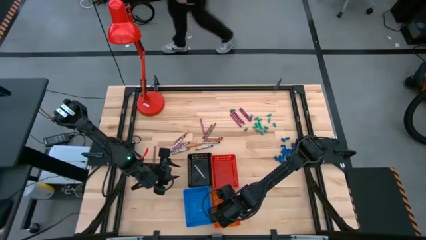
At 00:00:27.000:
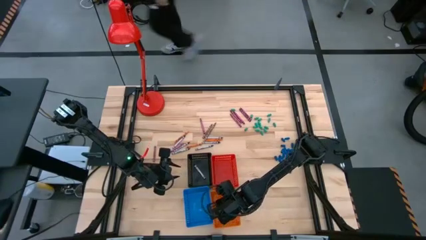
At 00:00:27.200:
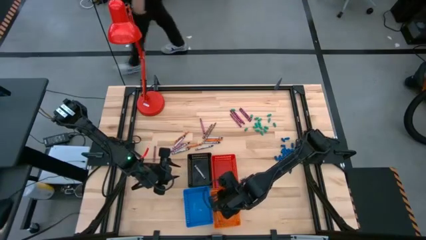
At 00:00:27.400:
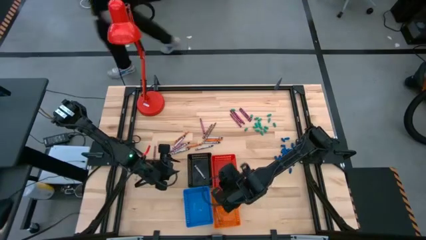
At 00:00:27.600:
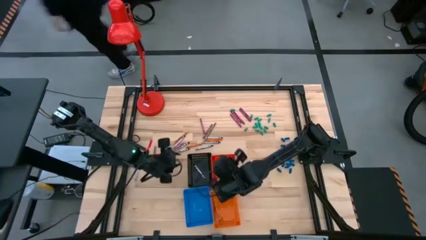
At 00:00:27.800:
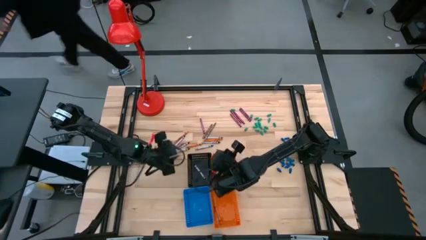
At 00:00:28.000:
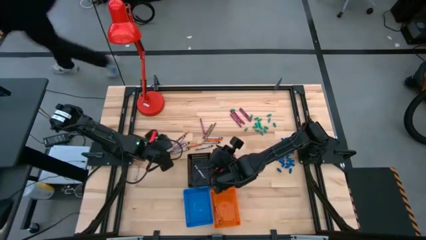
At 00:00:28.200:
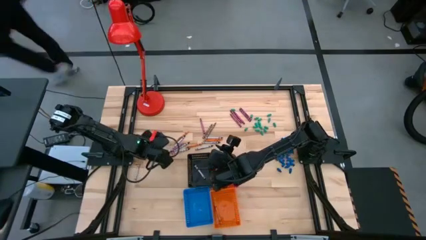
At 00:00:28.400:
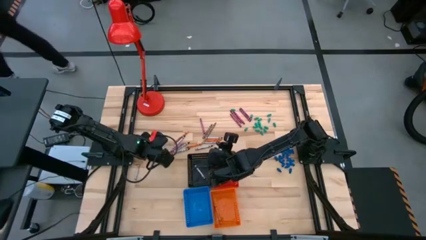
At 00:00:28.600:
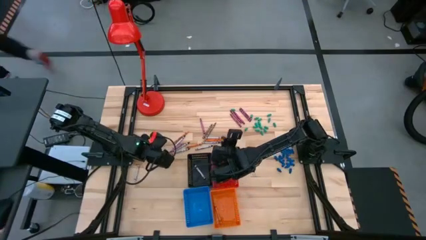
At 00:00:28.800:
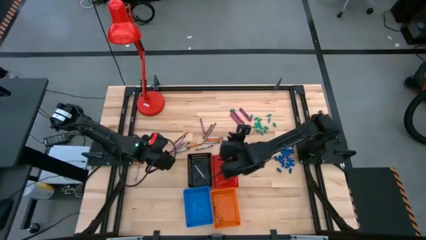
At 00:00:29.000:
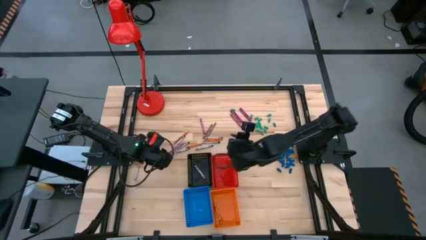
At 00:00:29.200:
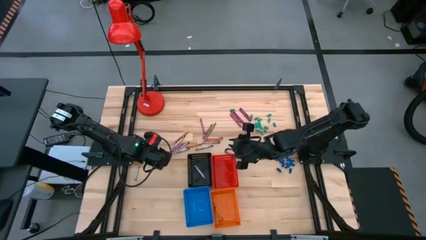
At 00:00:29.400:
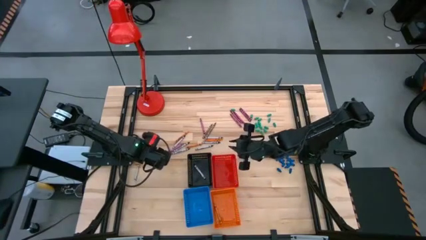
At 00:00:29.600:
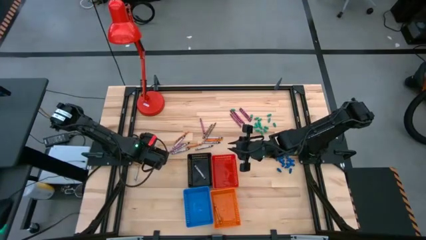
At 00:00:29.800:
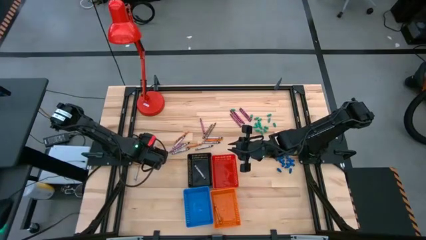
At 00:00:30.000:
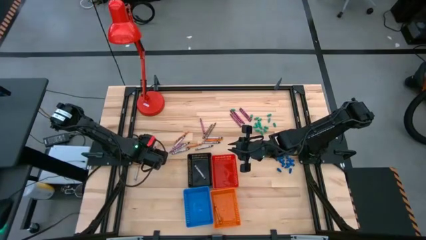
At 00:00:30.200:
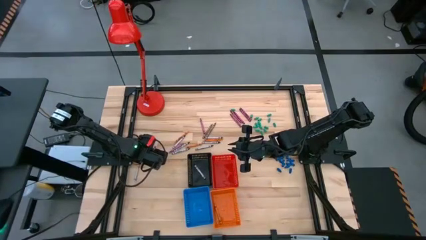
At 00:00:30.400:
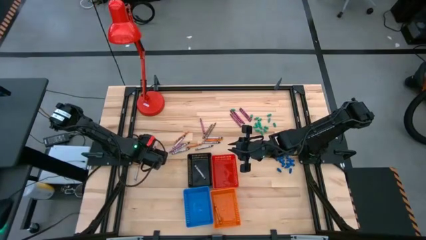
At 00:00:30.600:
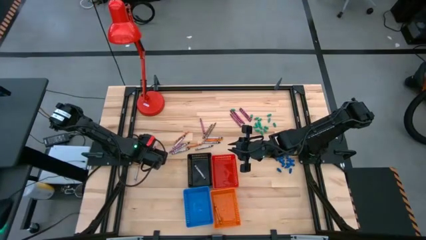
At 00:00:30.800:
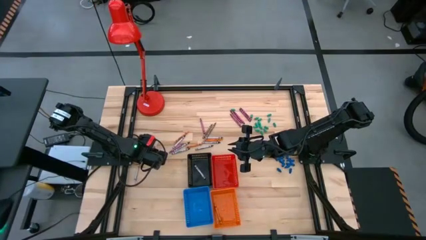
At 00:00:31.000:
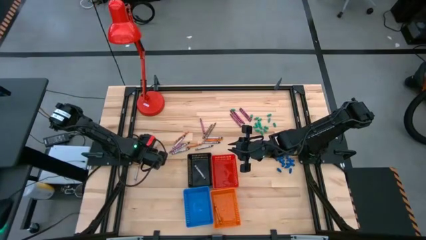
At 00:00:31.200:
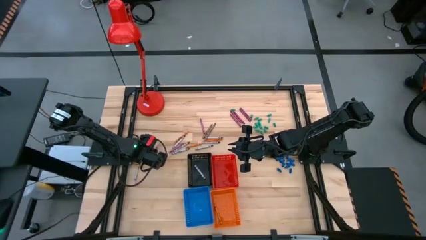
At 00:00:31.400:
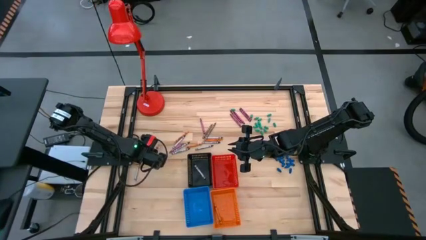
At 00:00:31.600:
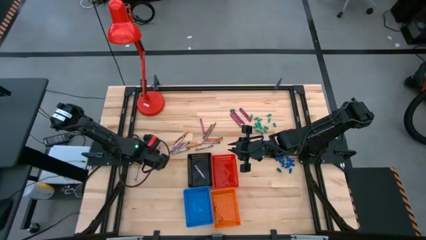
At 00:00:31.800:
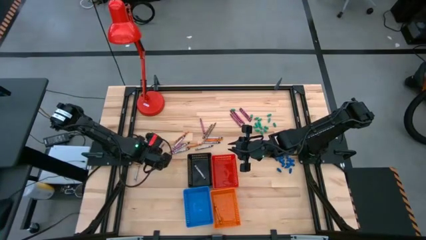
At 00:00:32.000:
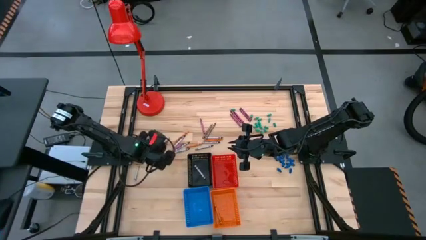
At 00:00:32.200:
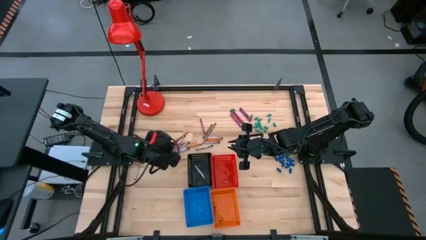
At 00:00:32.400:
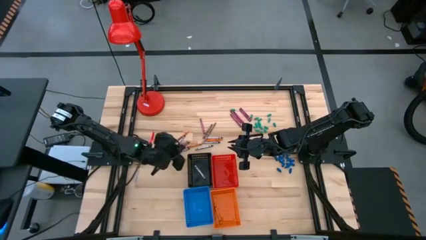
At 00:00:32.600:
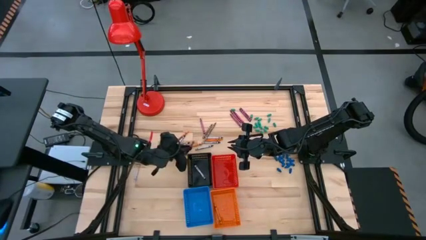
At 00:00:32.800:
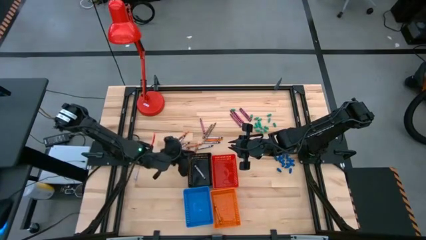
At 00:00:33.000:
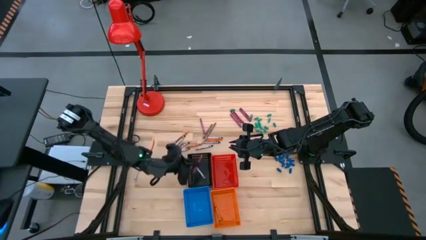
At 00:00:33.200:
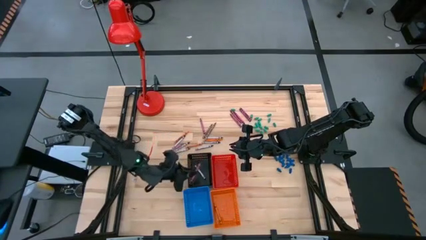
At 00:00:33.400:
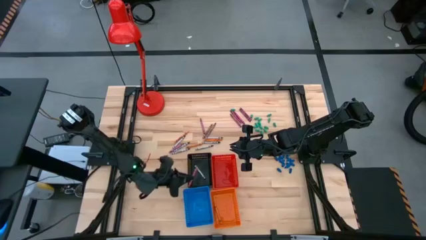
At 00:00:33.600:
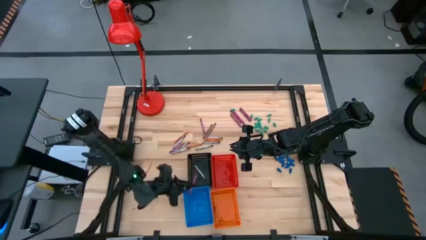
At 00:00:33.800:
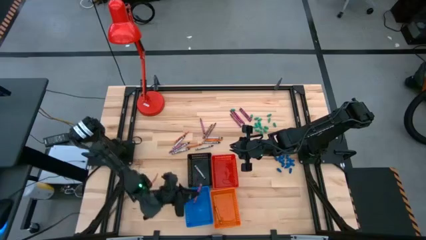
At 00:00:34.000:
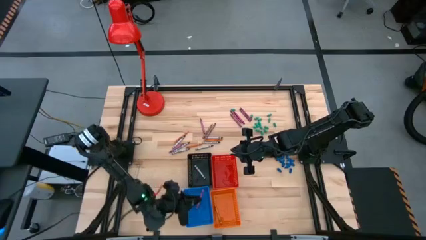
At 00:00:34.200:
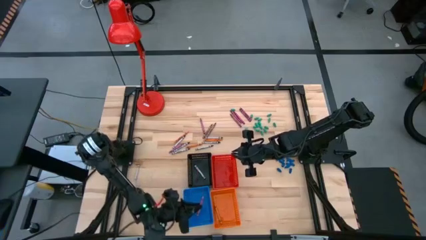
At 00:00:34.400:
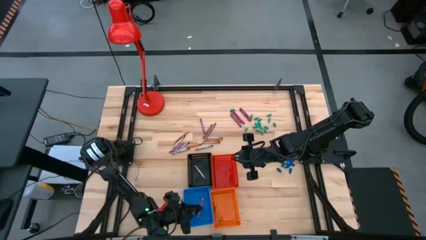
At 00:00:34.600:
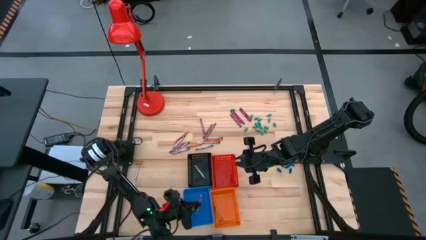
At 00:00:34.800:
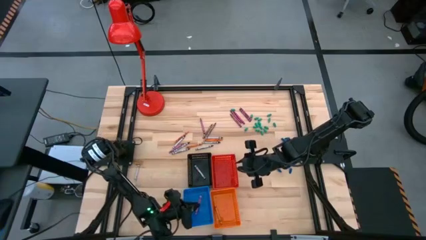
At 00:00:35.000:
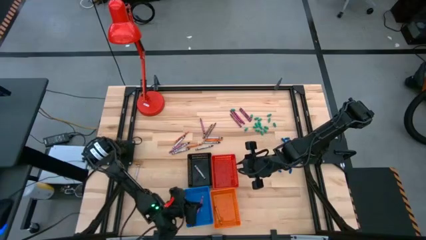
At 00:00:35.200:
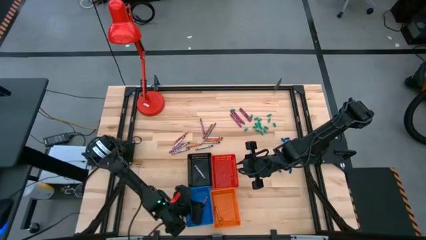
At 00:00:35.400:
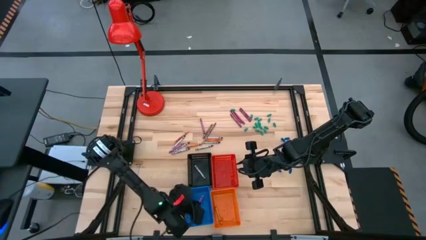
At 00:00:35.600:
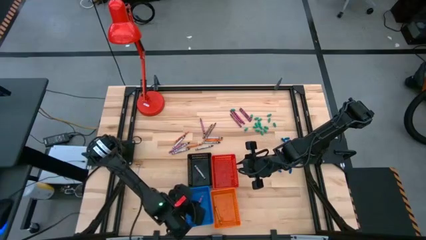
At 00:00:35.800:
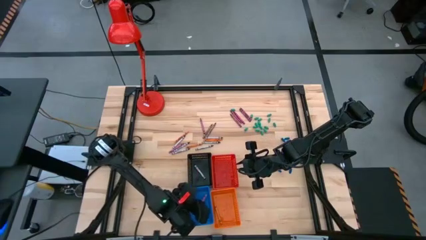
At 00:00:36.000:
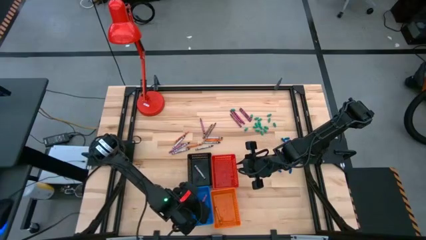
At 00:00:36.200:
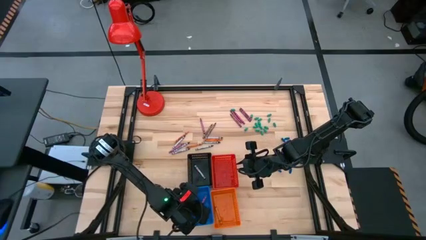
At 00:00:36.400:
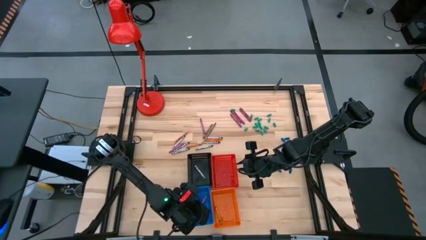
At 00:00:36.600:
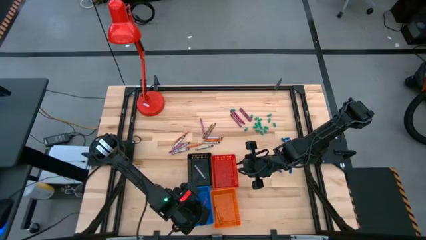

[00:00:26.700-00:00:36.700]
Task: Sort crayons
Put the red crayon into the blue basket

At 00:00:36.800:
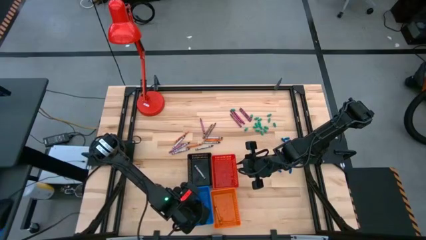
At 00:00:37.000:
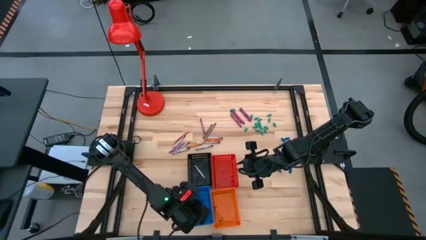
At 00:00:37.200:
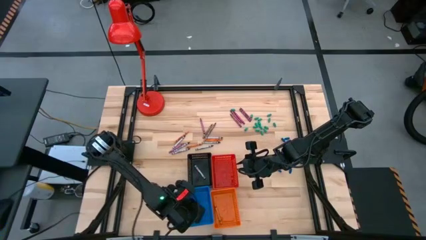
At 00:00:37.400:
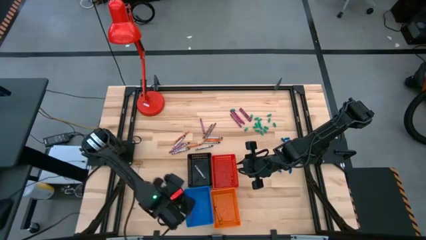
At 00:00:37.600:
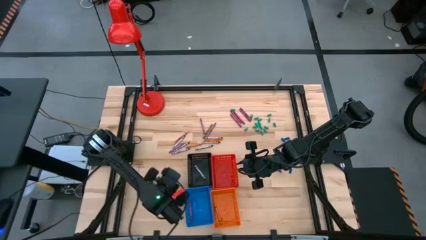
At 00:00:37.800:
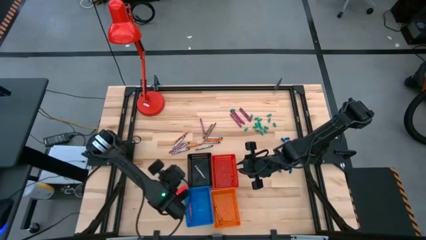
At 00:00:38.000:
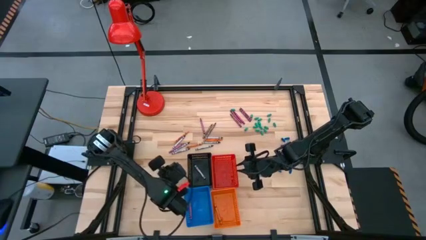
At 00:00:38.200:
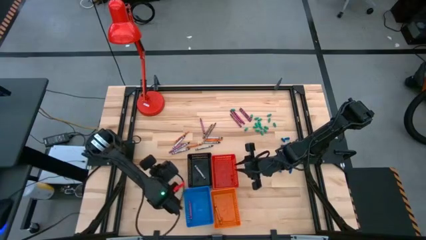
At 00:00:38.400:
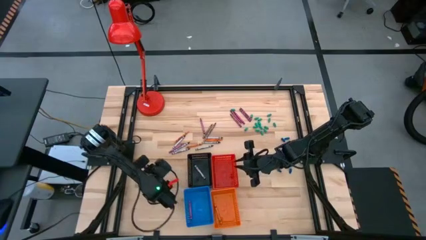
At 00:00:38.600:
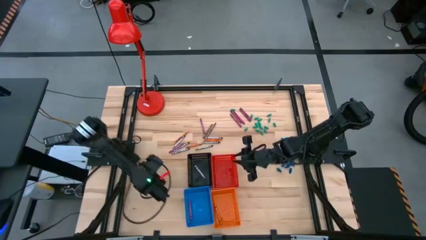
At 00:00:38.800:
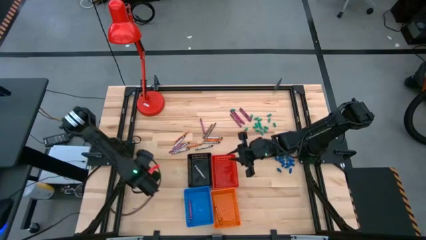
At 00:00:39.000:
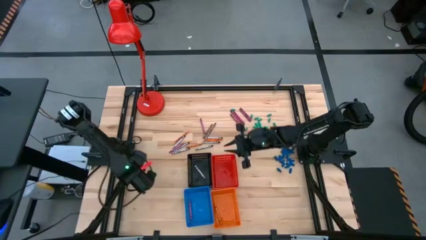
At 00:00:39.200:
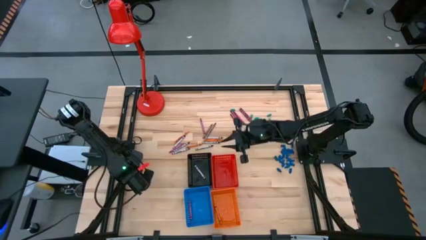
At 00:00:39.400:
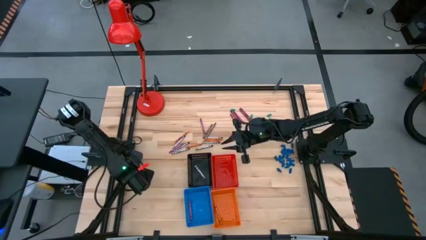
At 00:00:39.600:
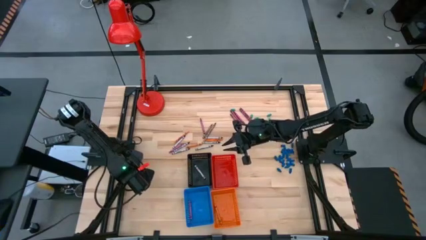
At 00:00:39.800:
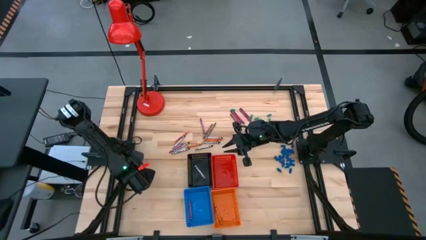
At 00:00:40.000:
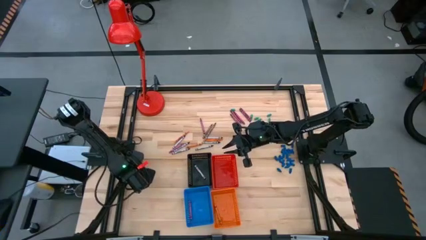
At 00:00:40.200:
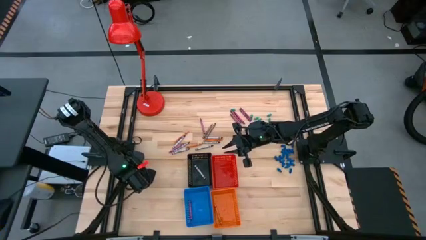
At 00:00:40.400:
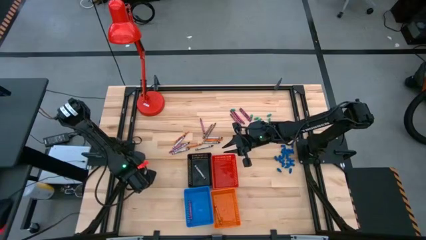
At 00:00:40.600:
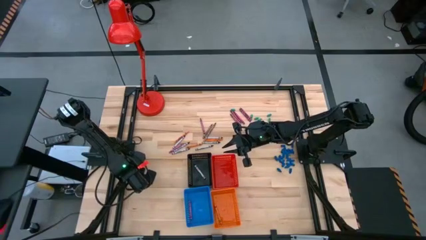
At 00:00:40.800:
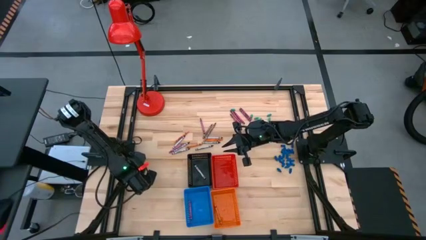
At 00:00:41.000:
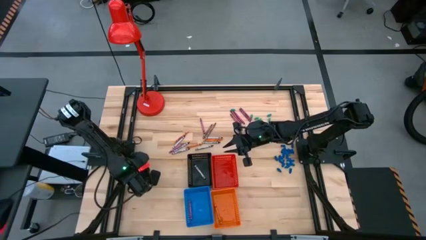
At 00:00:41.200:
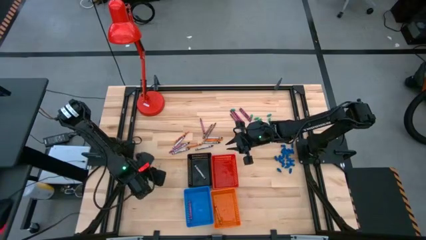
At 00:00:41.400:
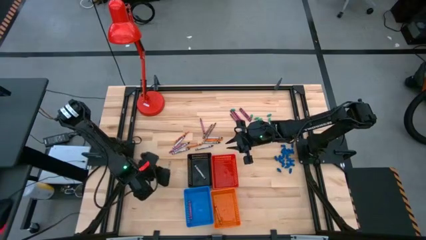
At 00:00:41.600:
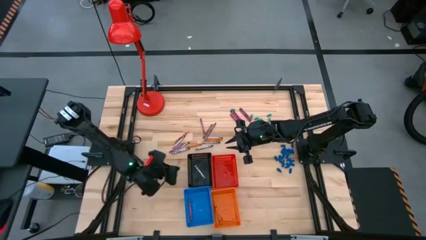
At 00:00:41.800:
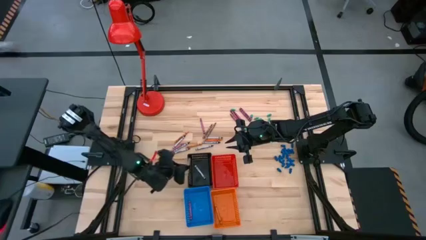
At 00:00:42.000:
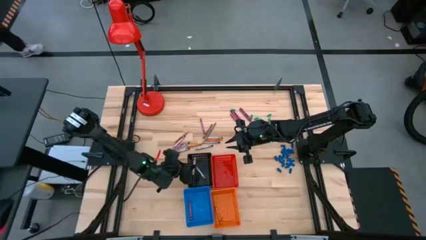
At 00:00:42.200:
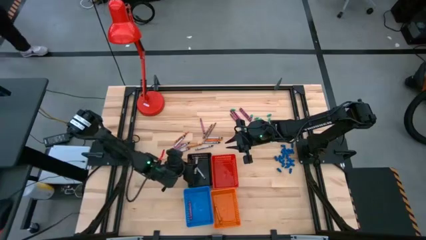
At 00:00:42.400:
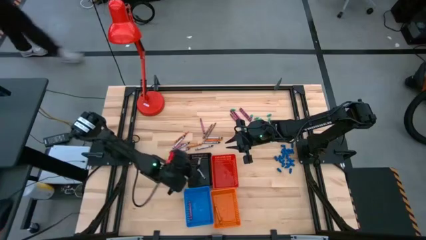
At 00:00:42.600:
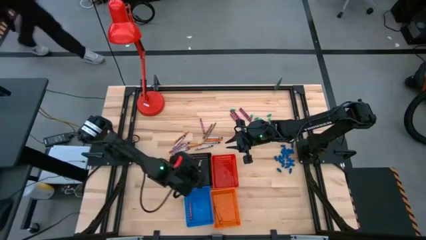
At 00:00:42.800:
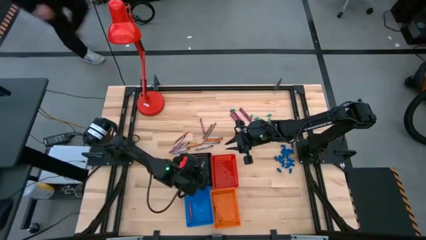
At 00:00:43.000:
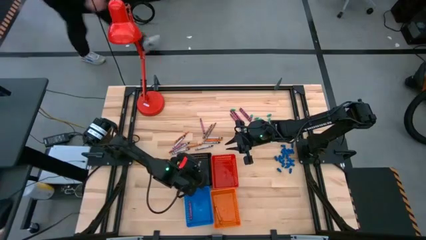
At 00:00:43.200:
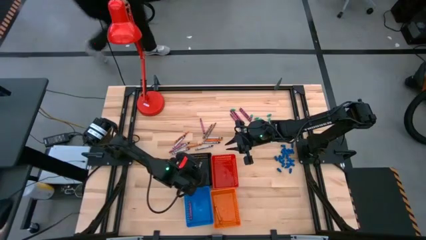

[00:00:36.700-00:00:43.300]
Put the black crayon into the black basket
